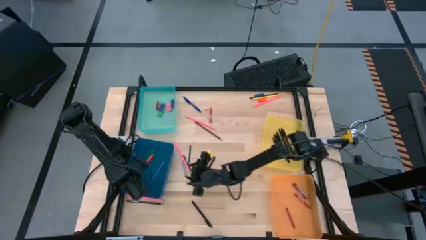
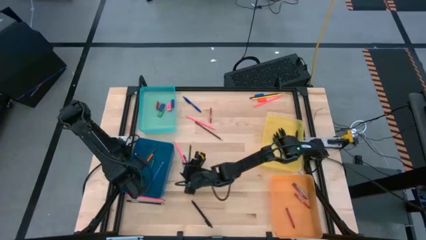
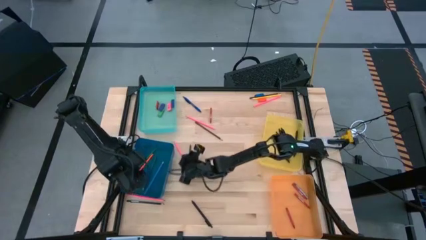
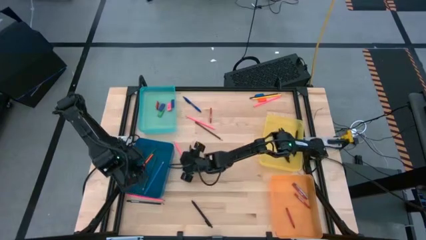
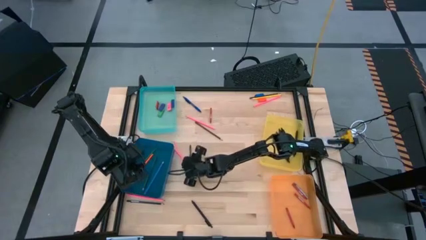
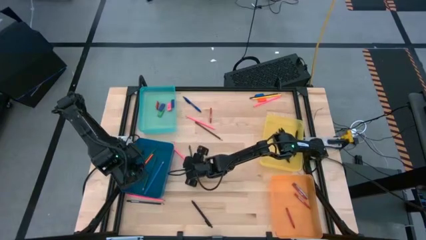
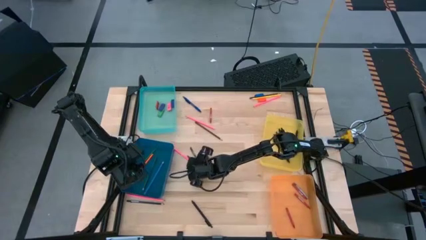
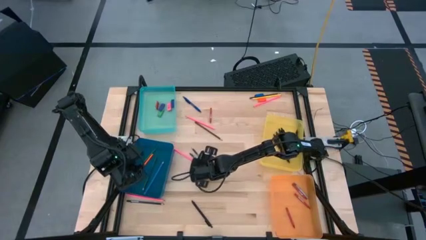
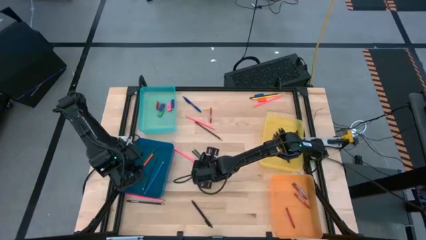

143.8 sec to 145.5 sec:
Task: Sort crayons/erasers/pens/pencils in bins
Adjust the crayons

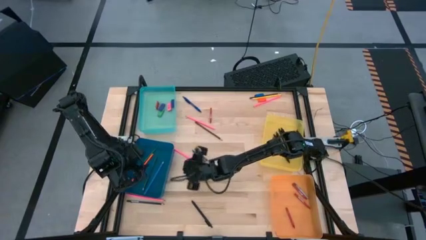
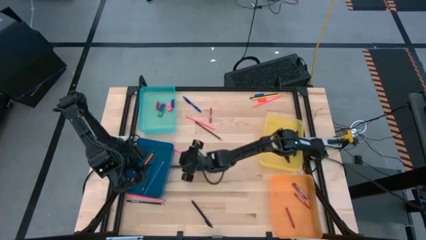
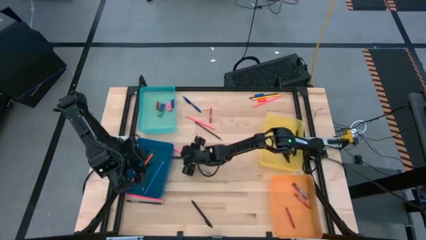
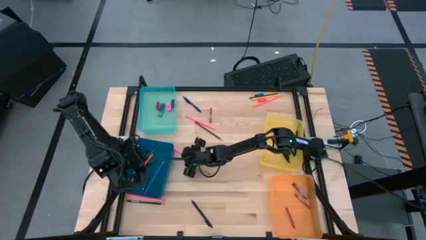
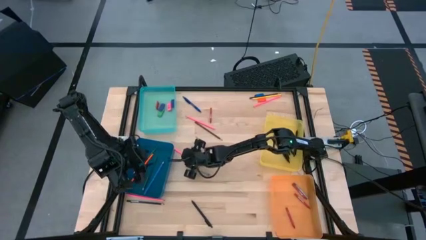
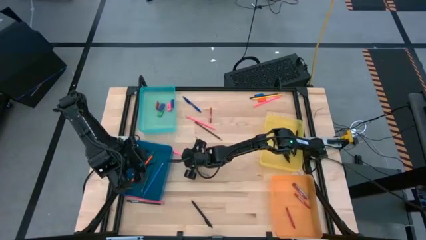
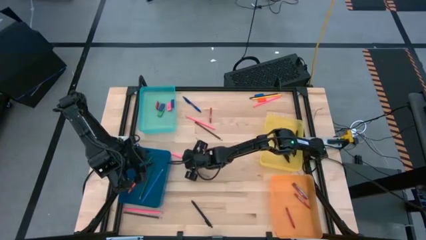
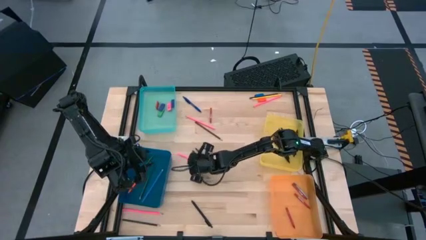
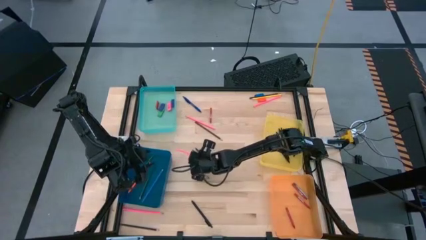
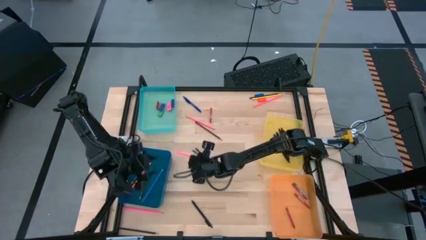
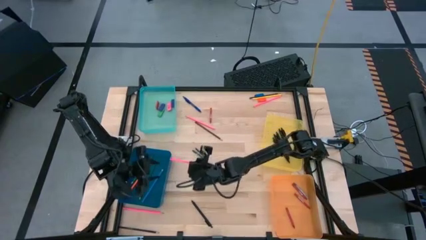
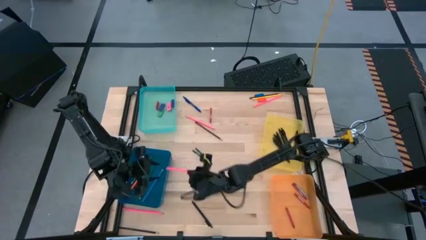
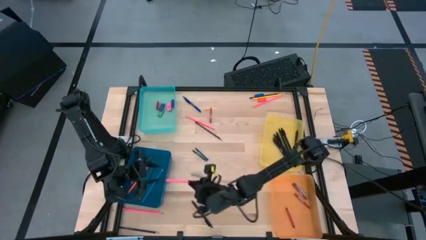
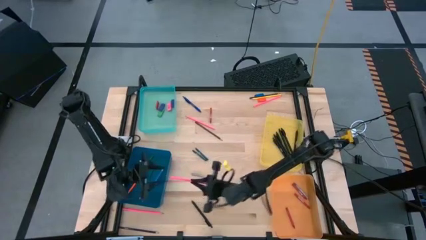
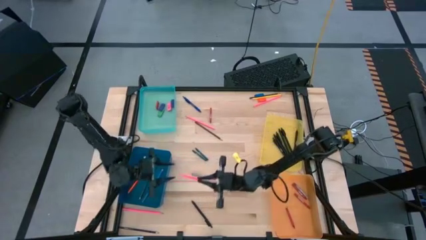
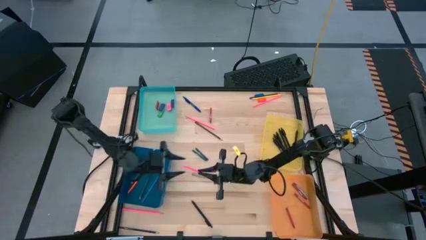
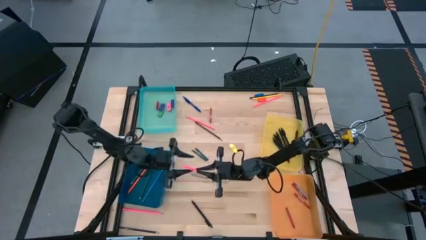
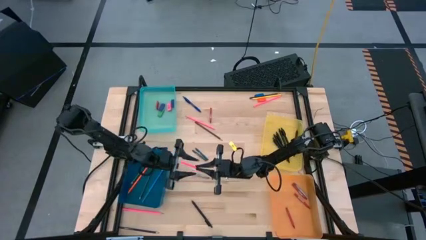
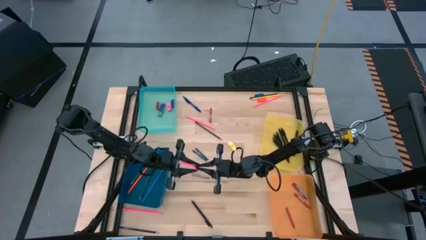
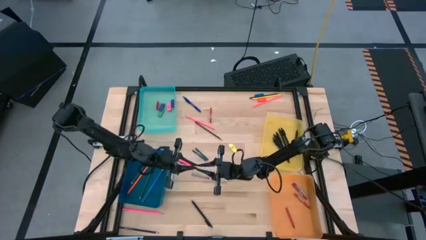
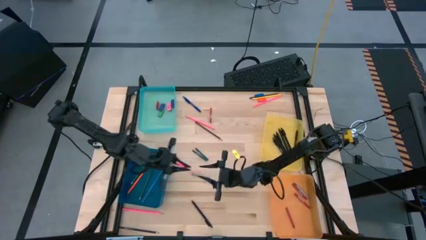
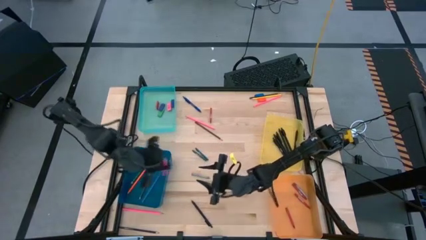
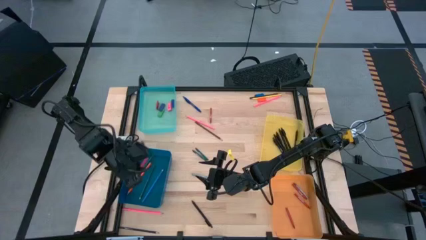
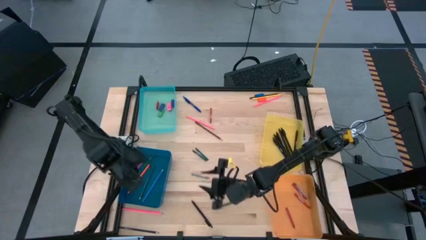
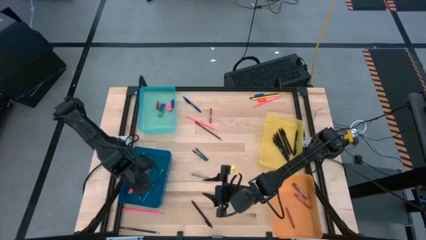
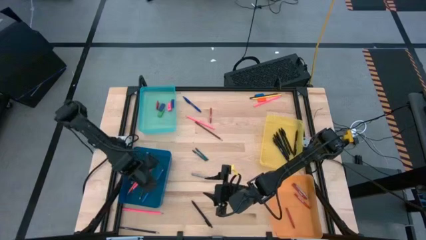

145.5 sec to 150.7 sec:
Put the pink colored pencil into the blue bin

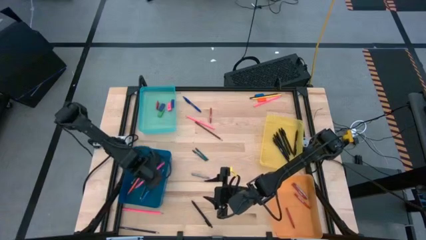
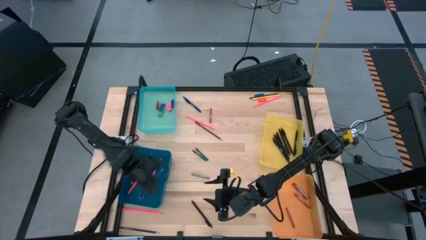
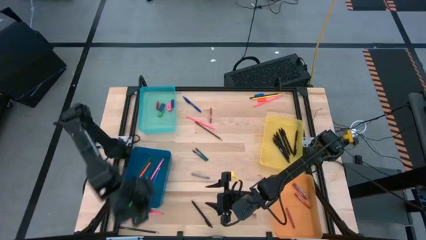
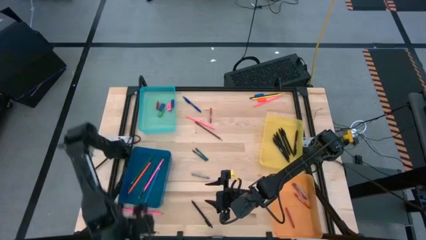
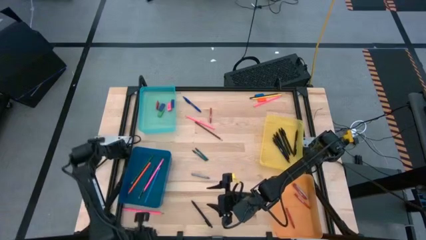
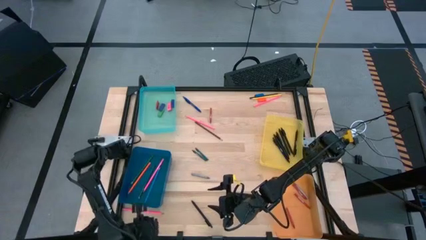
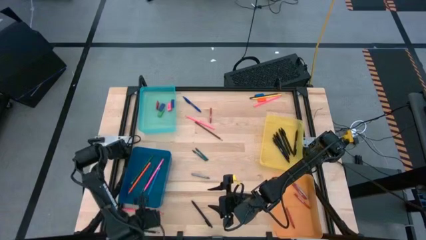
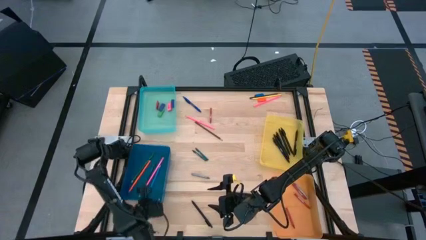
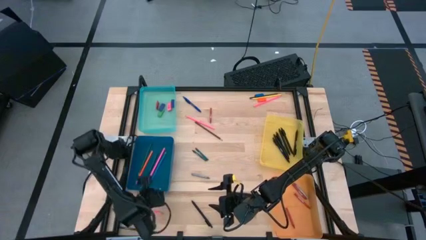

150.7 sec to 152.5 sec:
Adjust the blue bin

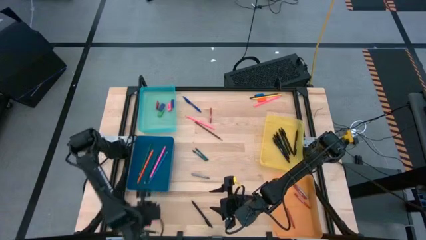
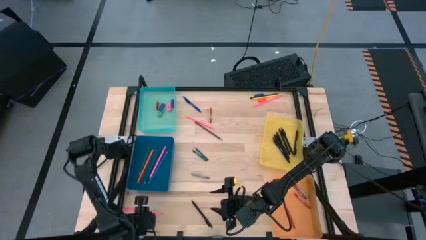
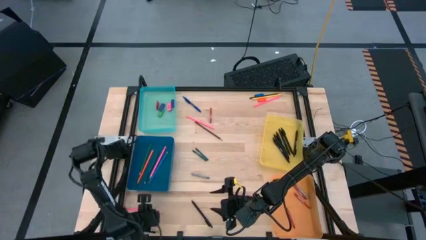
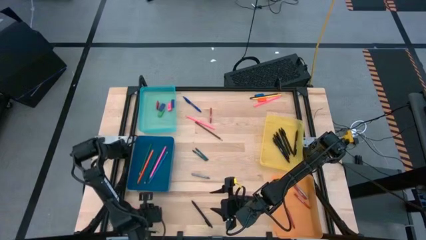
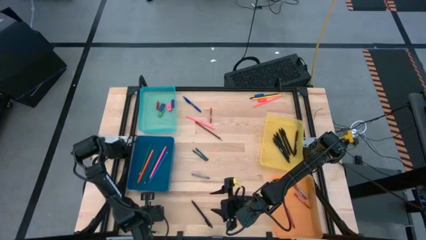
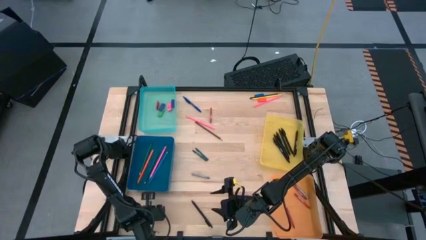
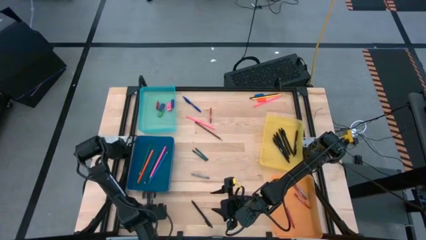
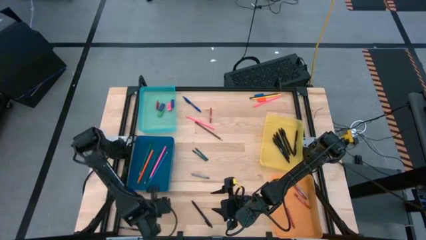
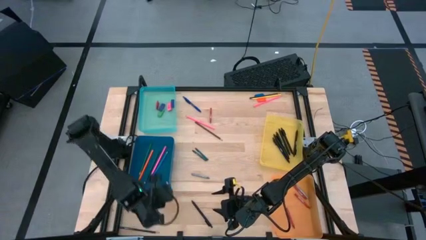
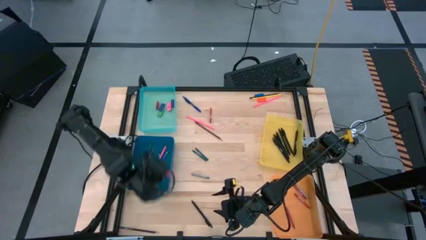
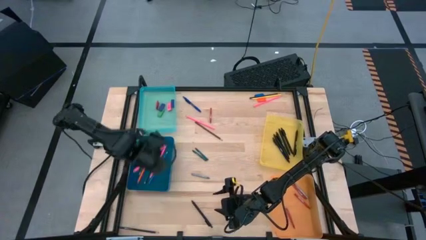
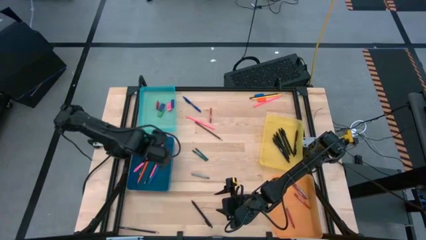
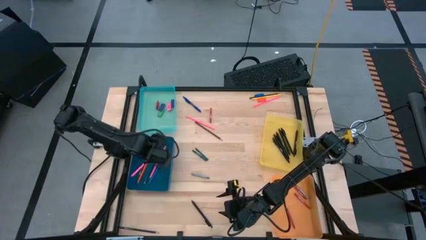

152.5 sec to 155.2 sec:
Put the pink colored pencil into the blue bin

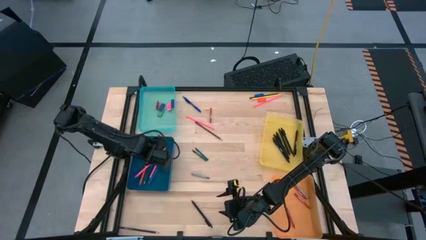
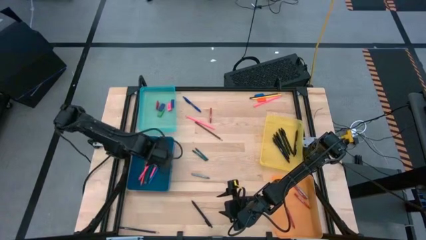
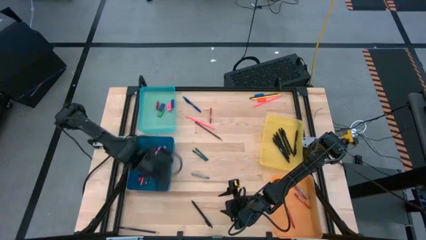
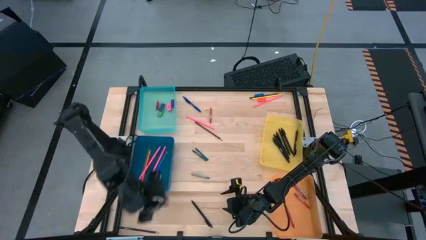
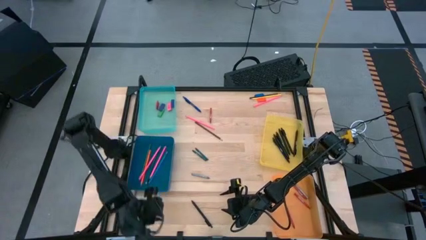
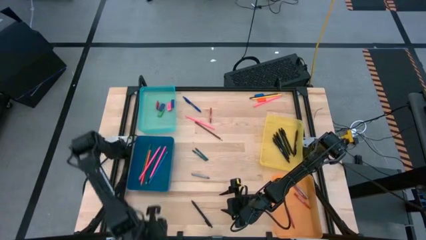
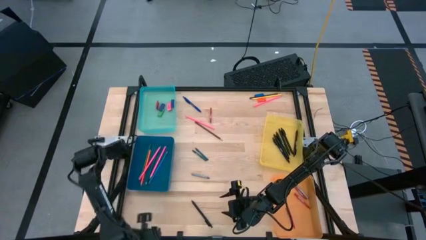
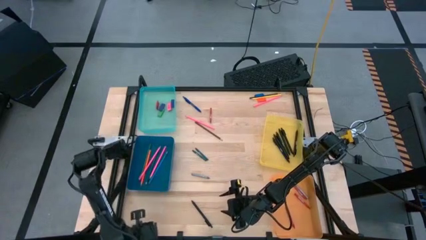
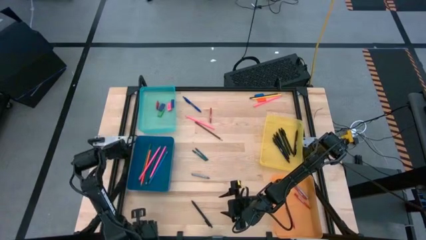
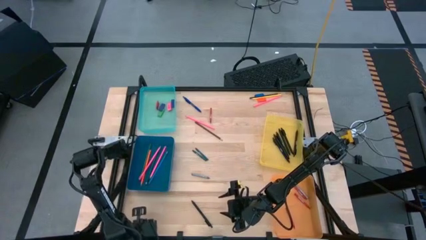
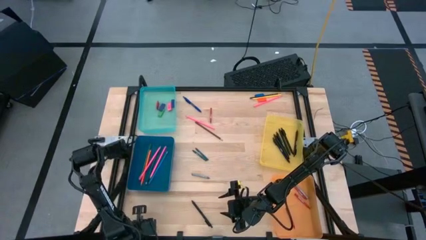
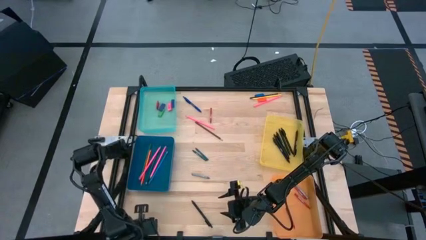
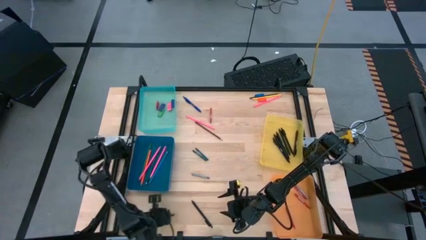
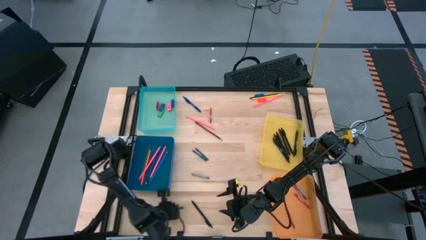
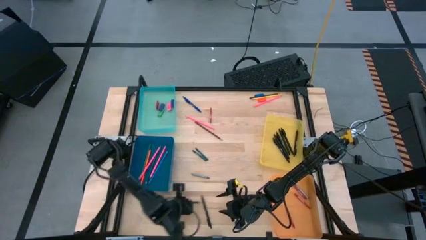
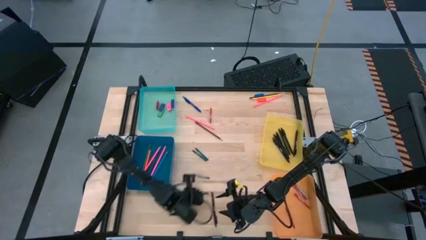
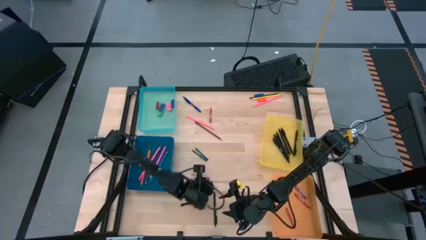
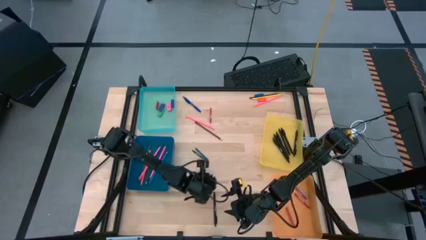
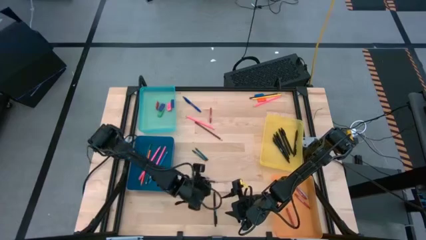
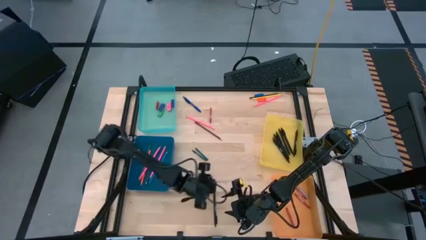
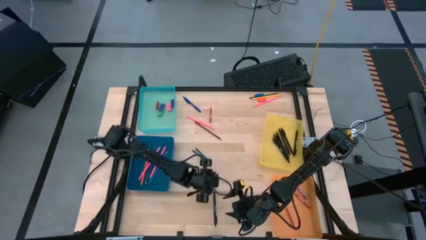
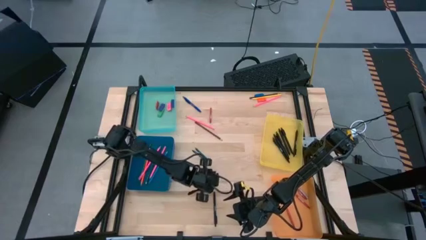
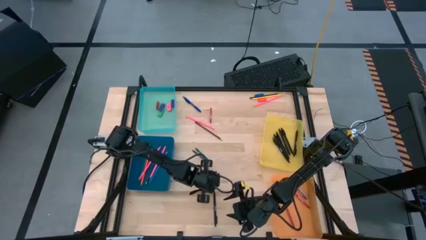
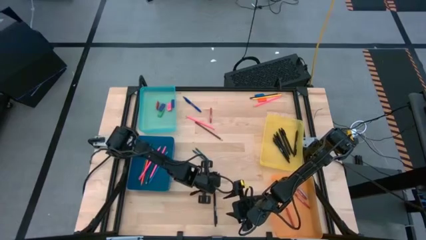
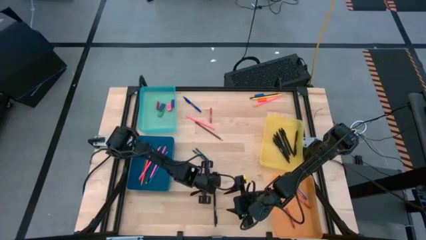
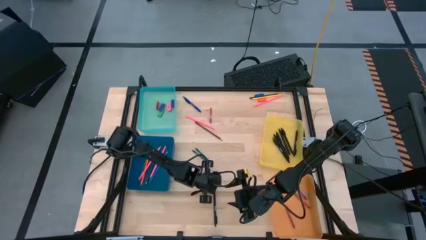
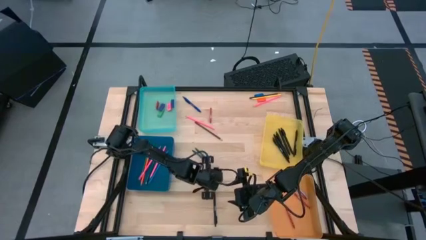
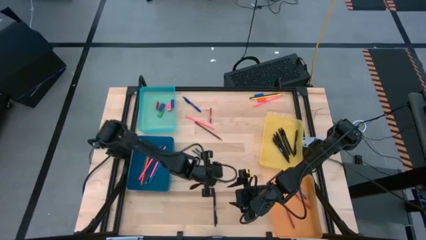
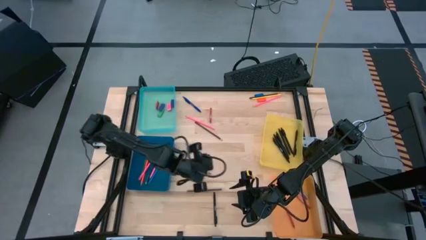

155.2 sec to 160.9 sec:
Put the dark blue colored pencil into the blue bin
